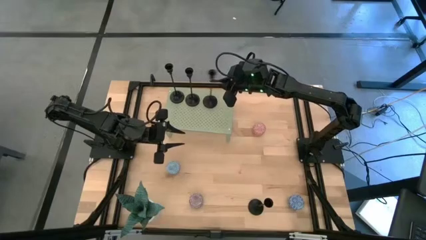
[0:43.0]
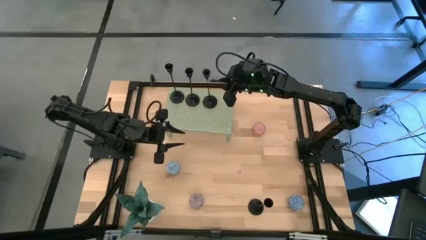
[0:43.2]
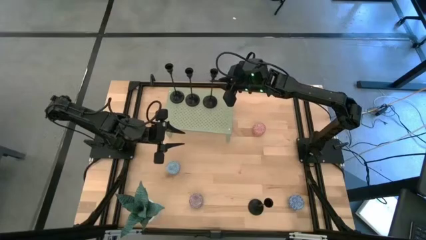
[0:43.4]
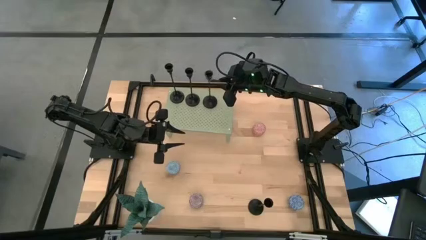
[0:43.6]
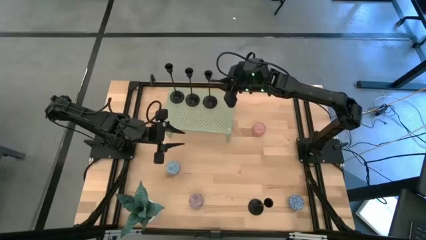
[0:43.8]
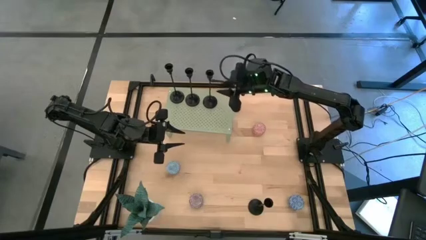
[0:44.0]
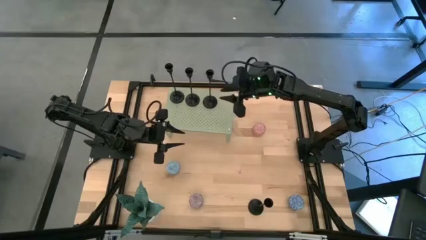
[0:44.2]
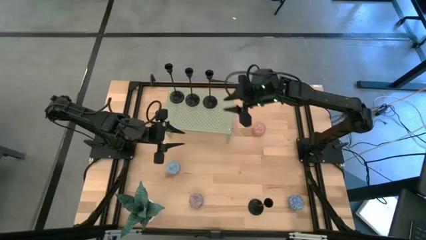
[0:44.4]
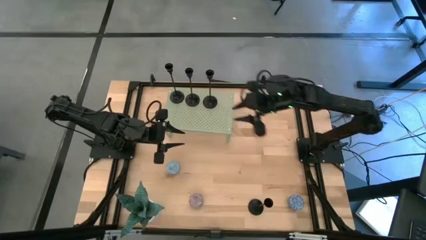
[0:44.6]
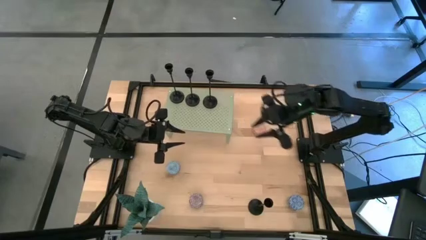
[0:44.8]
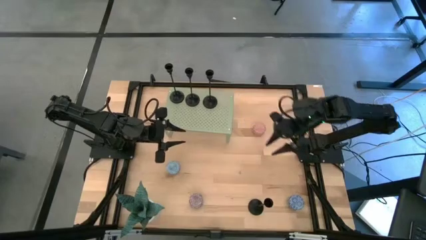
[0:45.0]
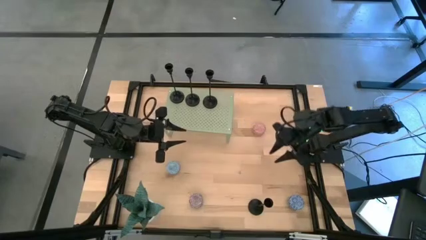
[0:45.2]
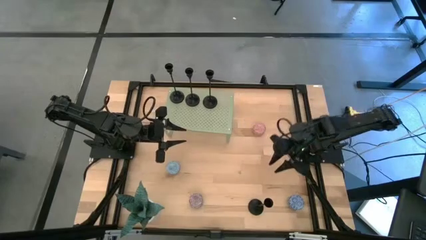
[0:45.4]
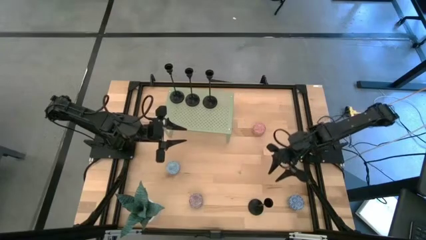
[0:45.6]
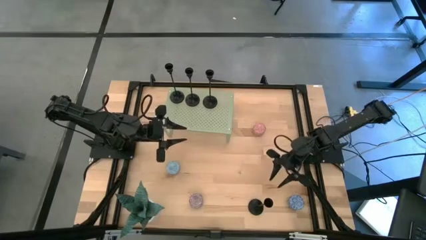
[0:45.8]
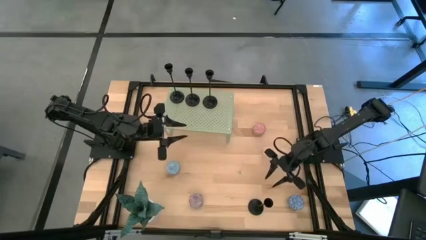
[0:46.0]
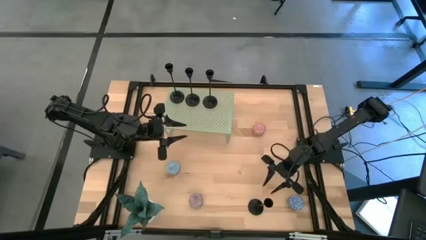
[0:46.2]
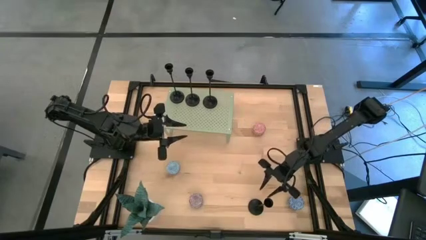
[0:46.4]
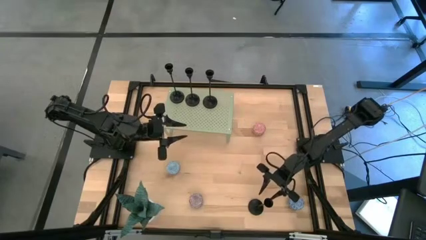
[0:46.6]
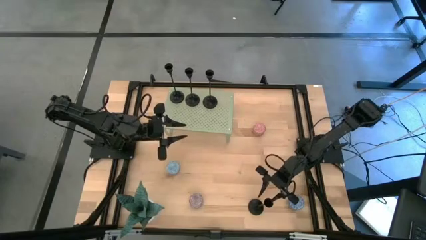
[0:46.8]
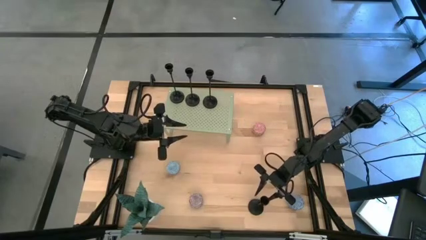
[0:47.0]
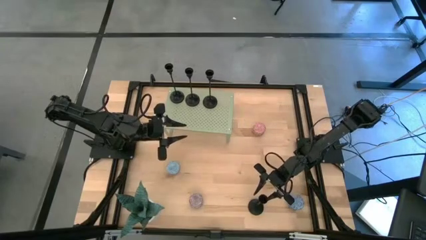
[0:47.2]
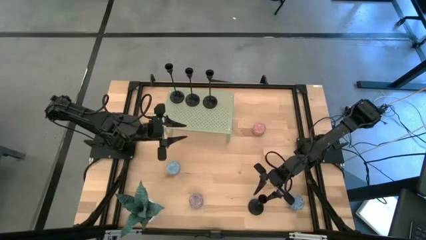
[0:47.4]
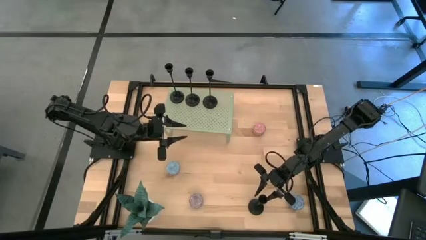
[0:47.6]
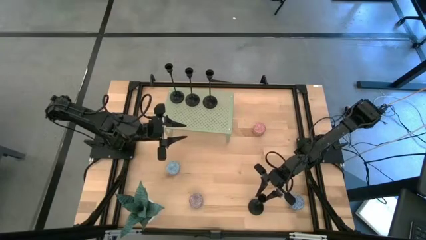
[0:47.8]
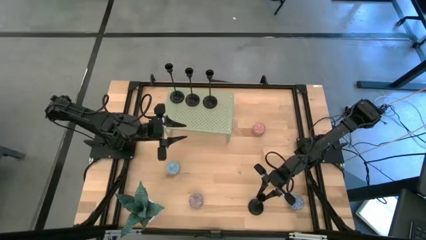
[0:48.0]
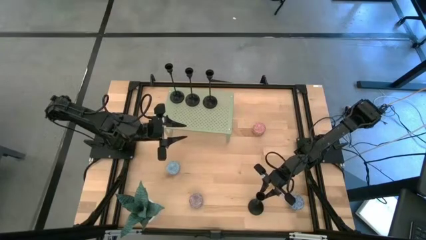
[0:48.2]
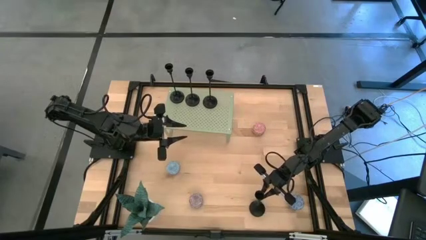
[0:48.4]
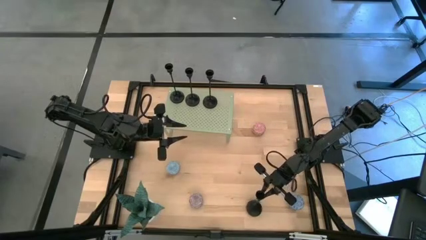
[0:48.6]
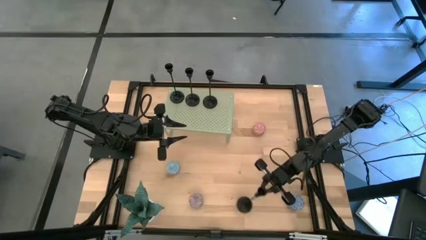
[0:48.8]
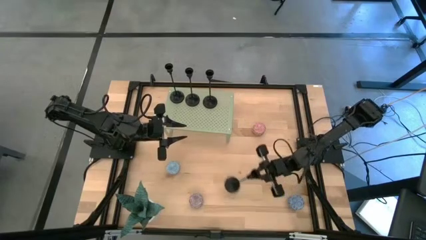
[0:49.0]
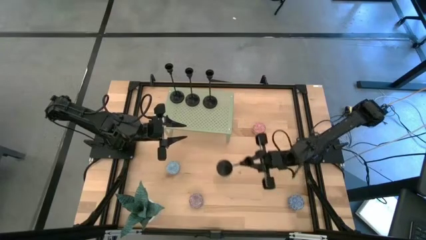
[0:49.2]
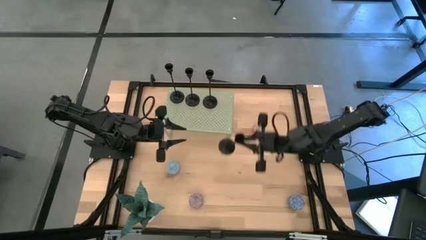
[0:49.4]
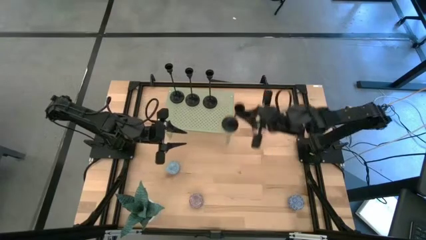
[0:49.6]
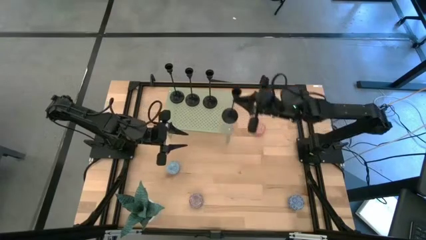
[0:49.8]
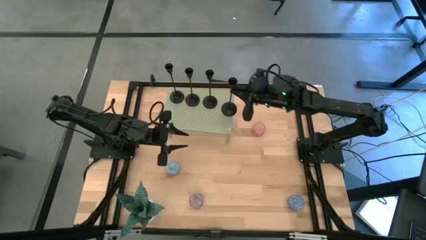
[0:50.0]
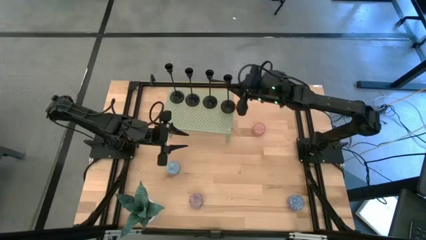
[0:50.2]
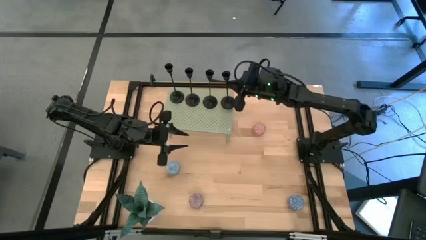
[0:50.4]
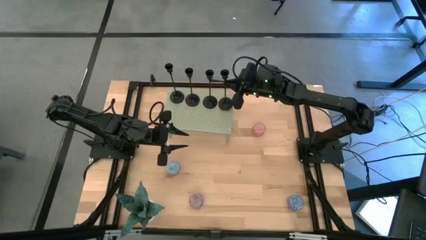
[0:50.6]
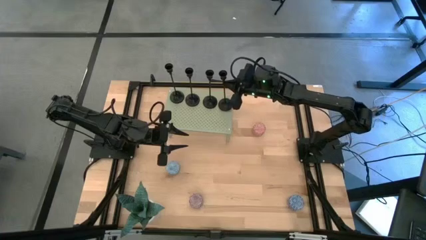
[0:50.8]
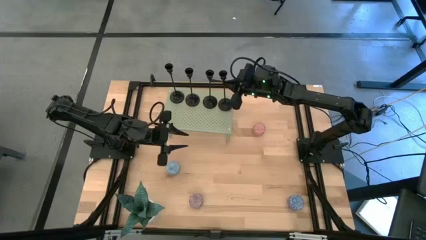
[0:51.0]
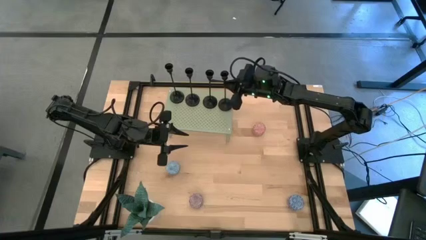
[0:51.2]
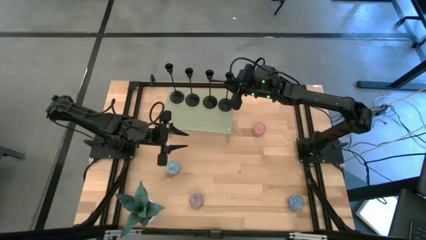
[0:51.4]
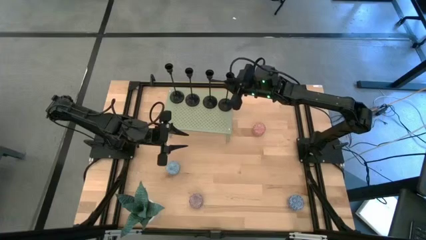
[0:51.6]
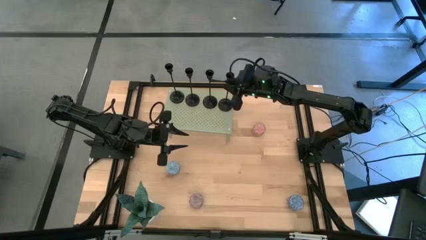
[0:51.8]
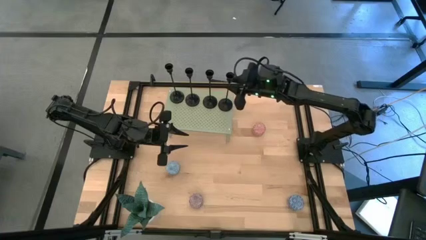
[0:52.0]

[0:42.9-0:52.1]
Task: Pick & Place candle stick holders
Put the black candle holder on the shelf aligned with the other black candle holders

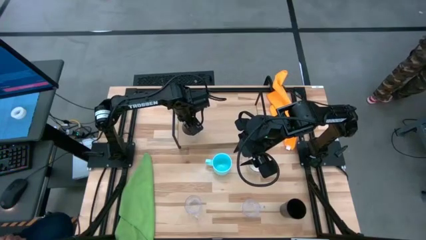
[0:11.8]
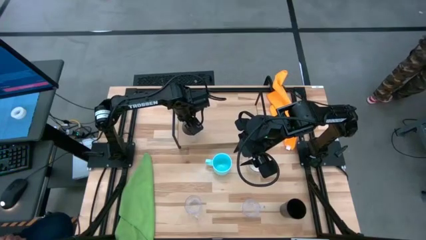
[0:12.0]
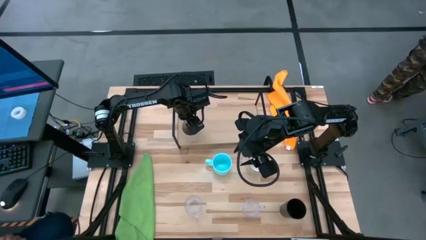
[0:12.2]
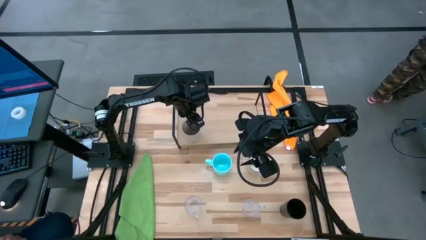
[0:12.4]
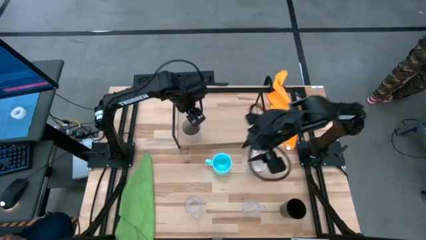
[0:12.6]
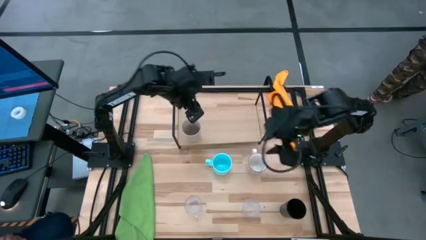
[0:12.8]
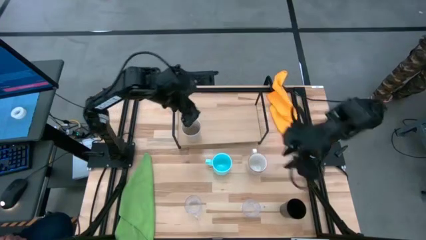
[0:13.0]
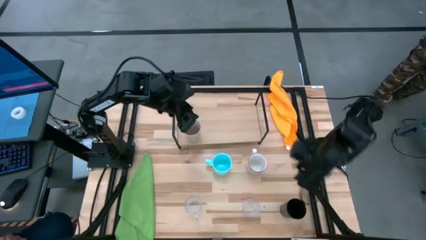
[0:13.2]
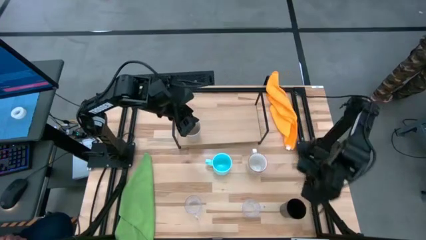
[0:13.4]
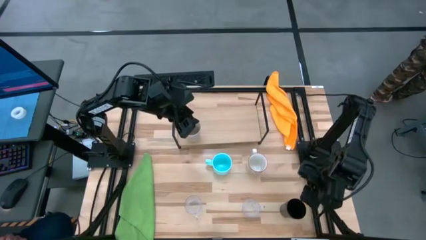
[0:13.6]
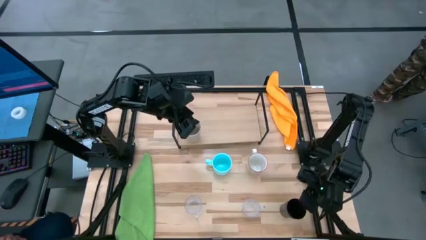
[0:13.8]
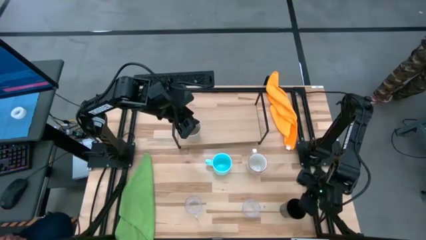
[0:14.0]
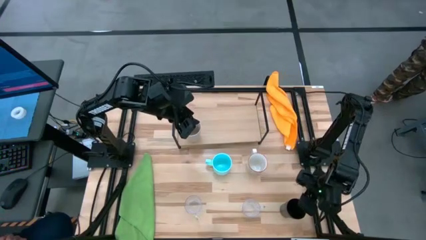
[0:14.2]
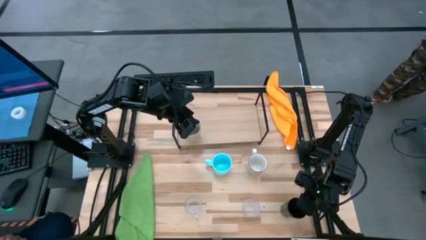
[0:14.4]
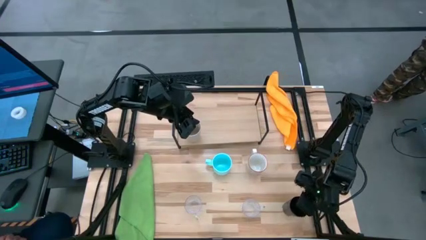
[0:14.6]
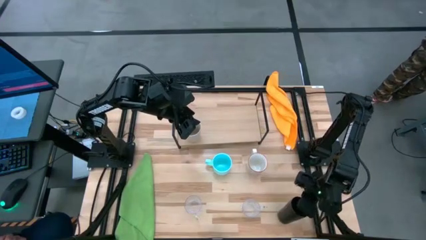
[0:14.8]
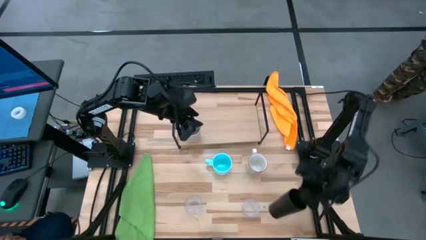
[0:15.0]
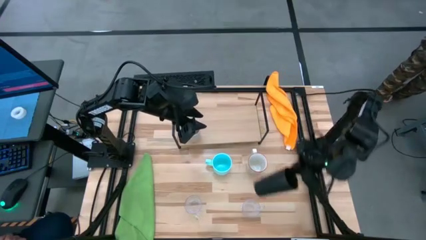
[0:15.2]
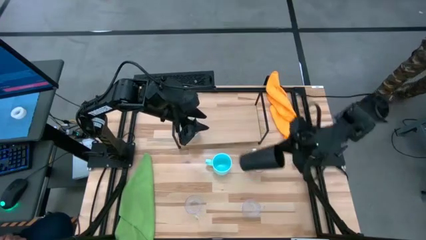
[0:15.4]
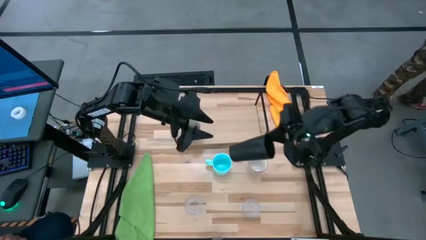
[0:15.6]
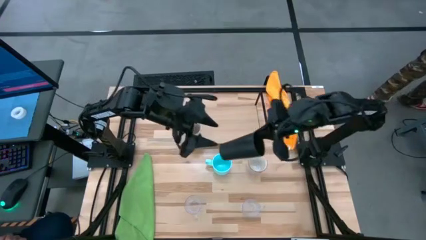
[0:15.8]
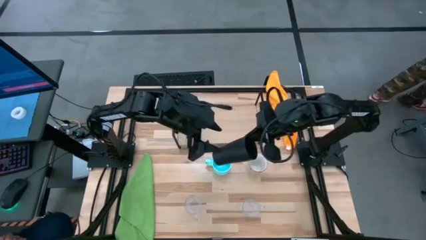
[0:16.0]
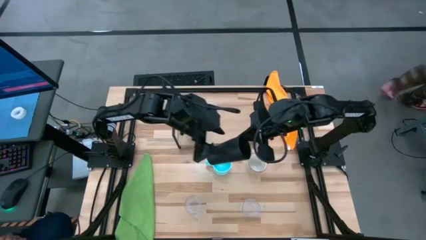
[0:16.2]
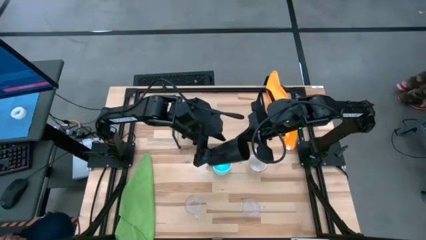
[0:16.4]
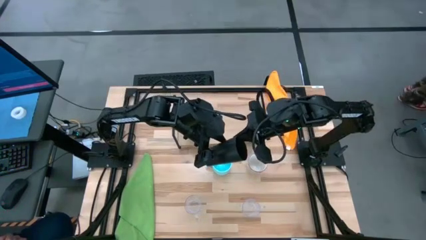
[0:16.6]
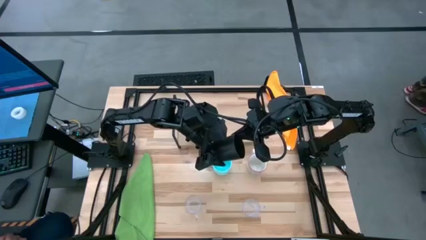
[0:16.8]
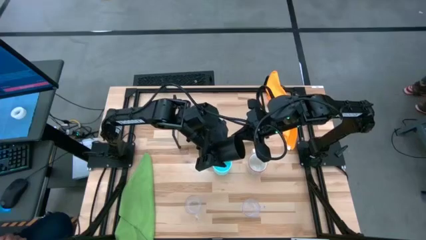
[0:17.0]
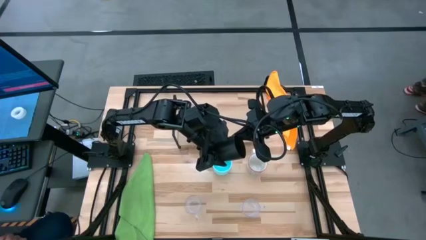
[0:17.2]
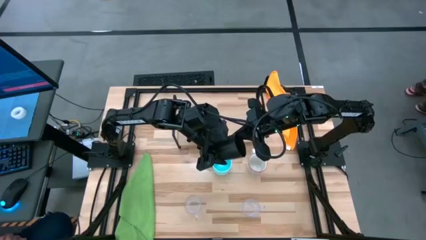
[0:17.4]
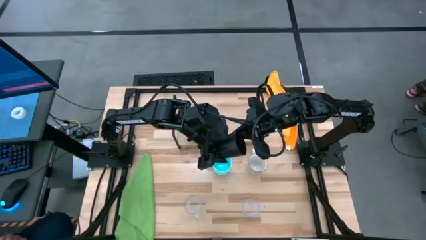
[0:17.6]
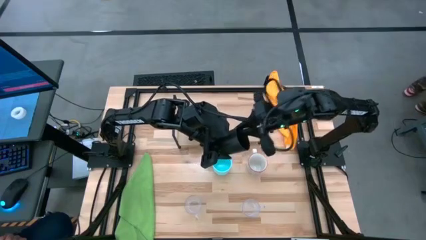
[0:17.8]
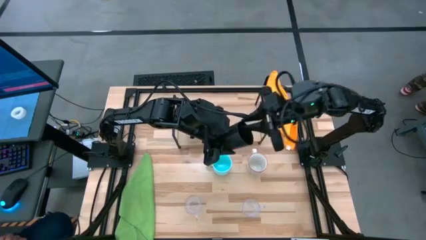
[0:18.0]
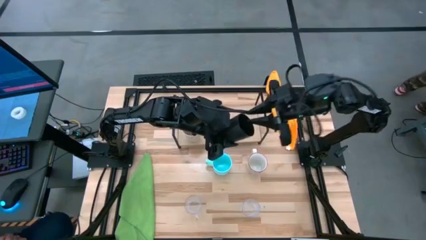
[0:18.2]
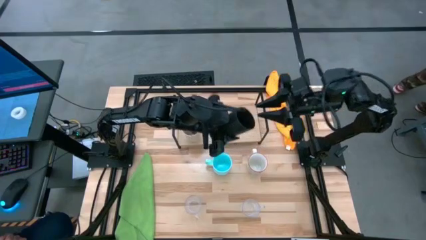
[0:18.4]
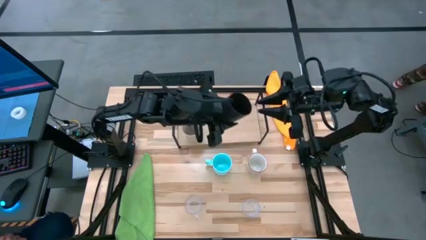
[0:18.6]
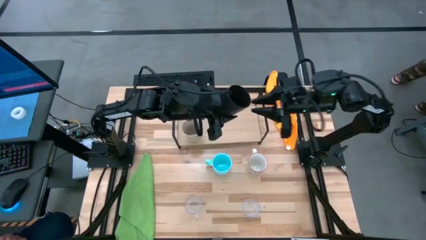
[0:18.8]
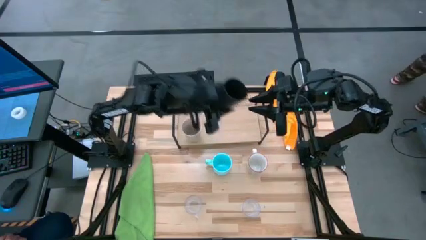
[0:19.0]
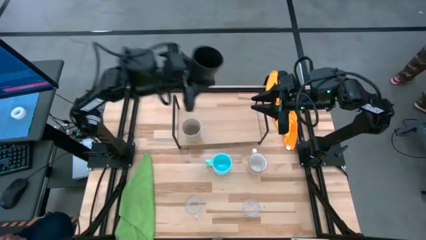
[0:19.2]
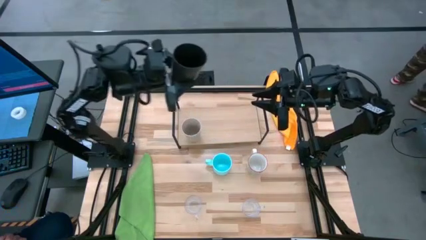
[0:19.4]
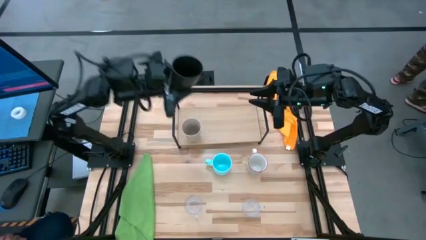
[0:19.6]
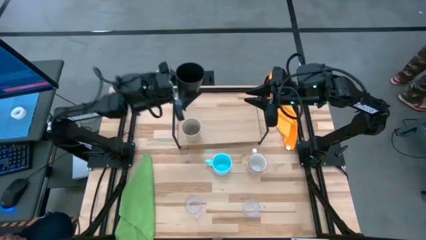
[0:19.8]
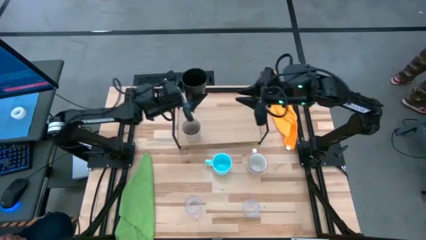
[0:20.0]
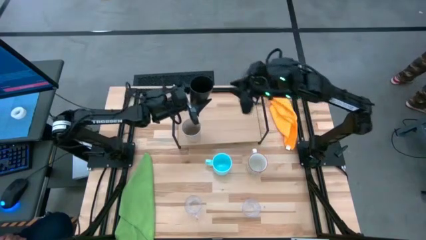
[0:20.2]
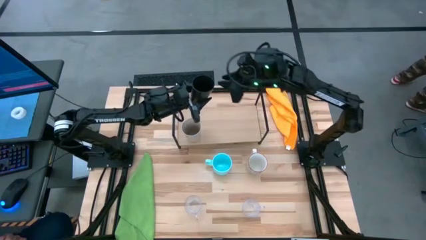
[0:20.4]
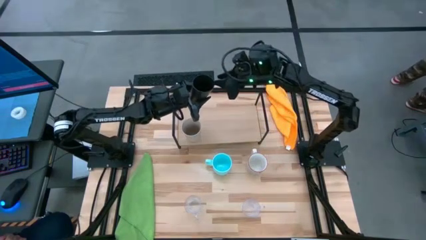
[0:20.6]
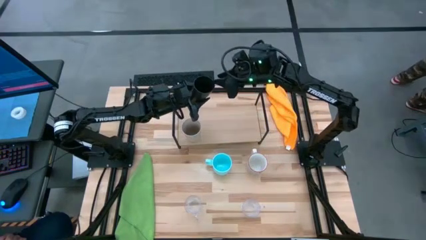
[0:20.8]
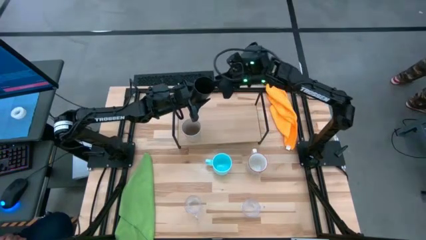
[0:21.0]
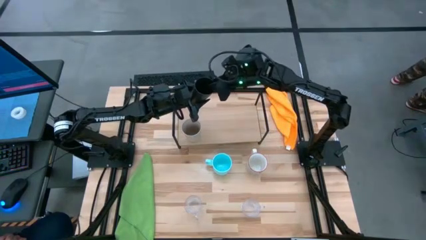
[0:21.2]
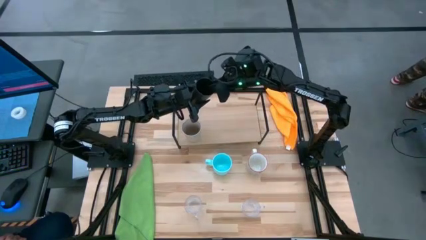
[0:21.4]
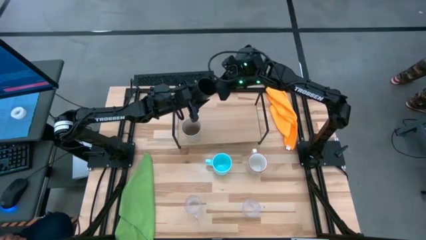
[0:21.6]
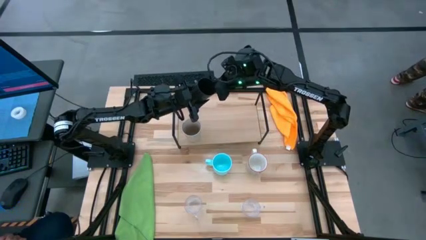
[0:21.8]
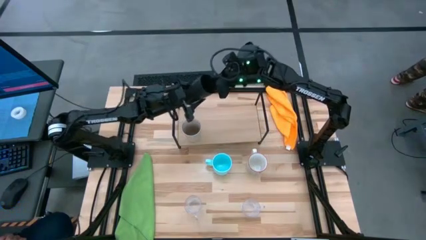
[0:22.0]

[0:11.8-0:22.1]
Task: Stack small to large cups/mugs on shelf
Put the black cup on the shelf
